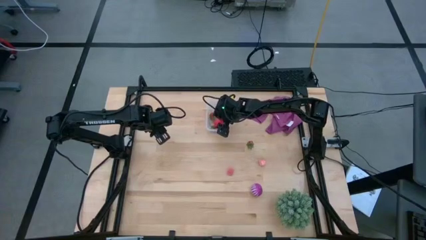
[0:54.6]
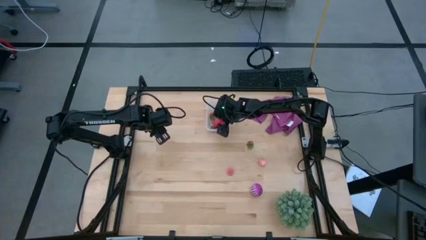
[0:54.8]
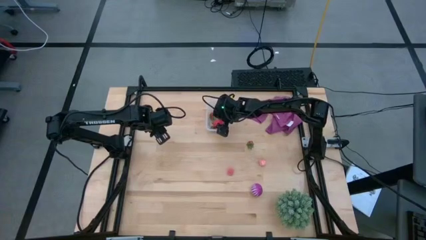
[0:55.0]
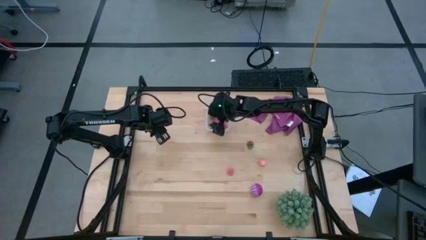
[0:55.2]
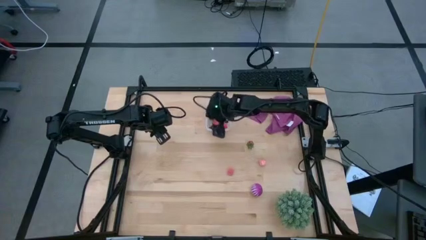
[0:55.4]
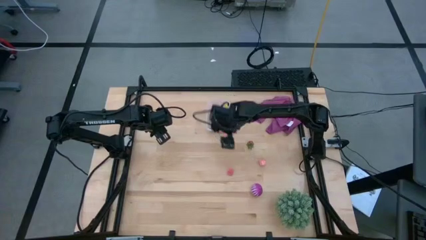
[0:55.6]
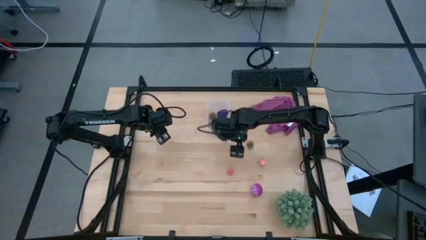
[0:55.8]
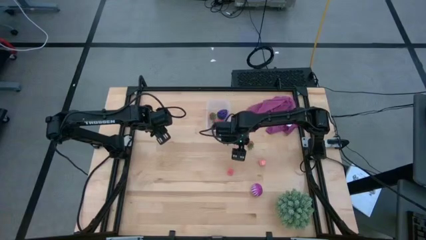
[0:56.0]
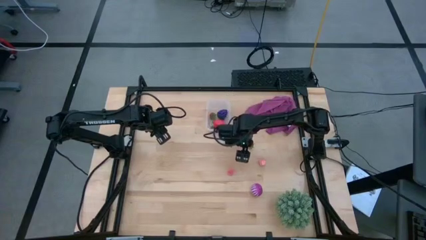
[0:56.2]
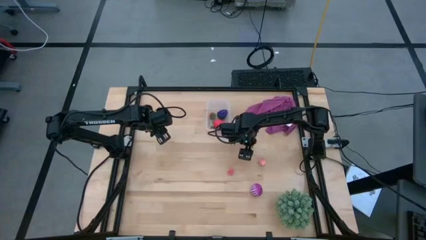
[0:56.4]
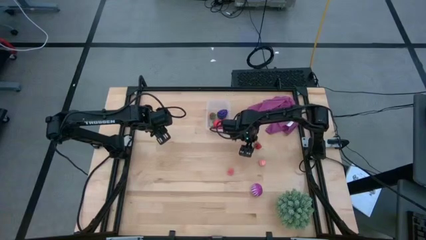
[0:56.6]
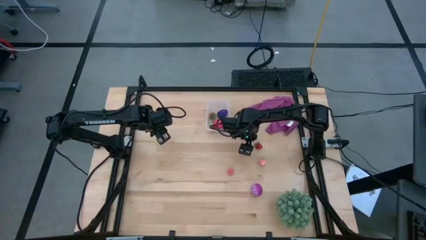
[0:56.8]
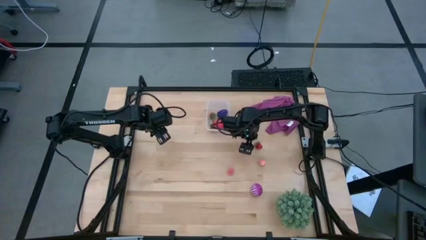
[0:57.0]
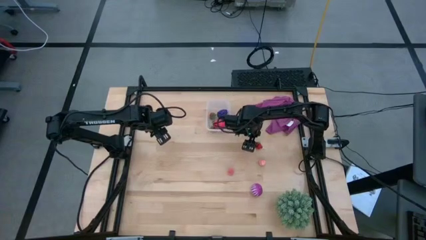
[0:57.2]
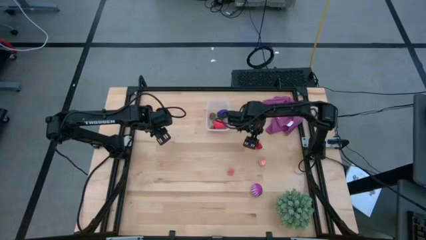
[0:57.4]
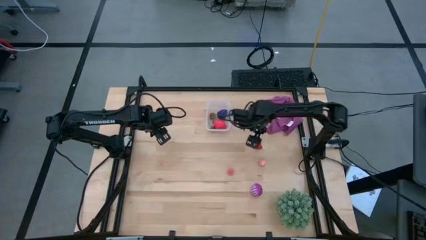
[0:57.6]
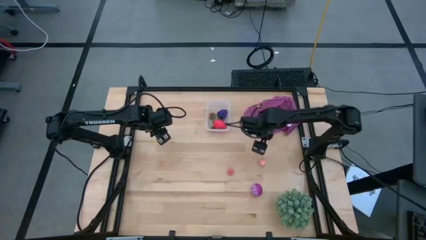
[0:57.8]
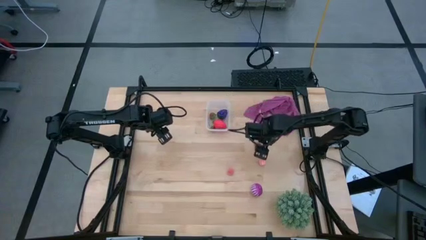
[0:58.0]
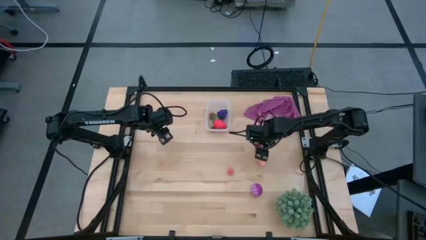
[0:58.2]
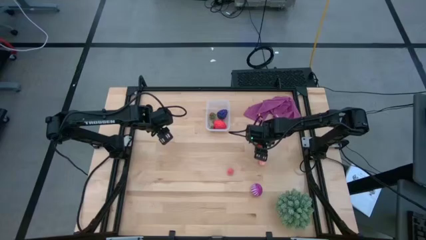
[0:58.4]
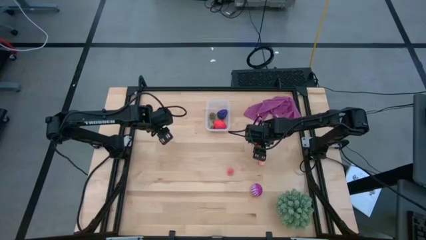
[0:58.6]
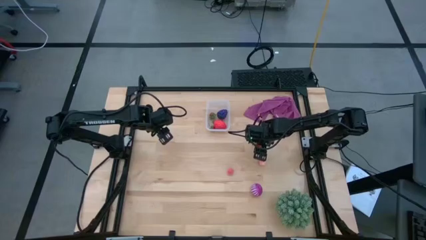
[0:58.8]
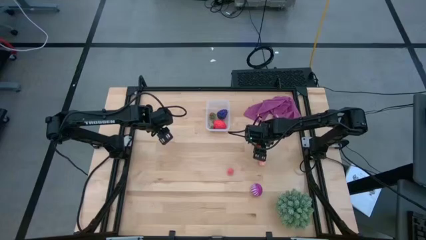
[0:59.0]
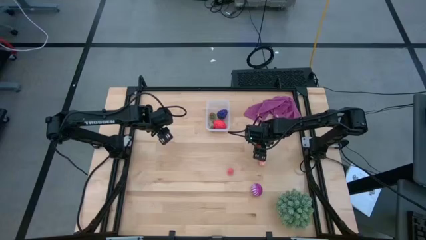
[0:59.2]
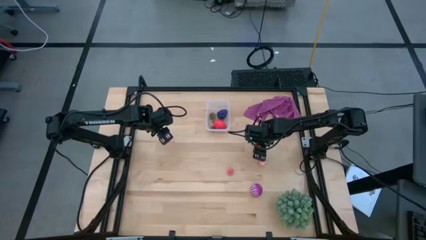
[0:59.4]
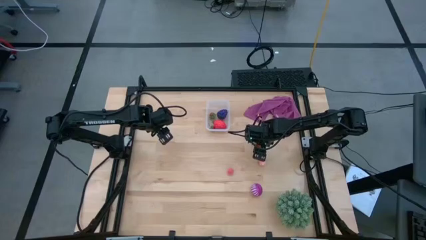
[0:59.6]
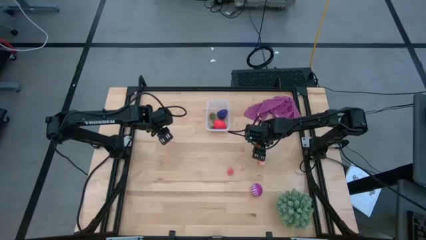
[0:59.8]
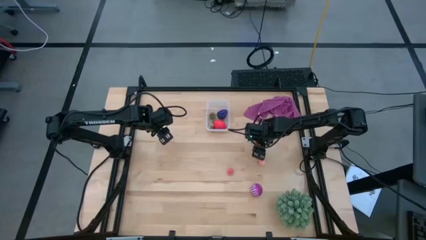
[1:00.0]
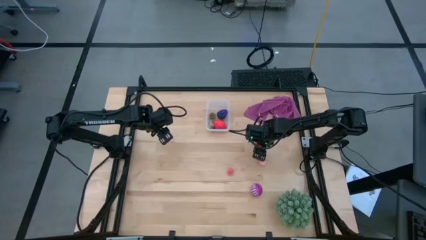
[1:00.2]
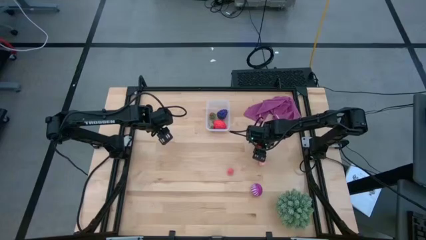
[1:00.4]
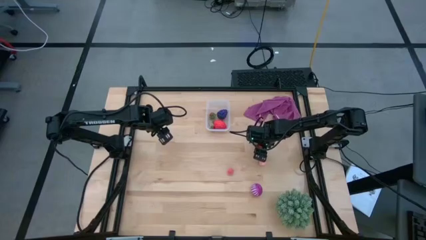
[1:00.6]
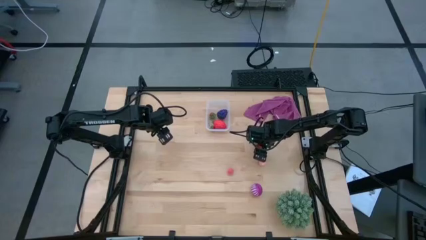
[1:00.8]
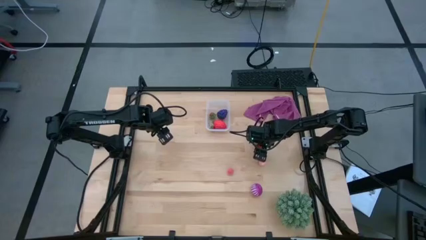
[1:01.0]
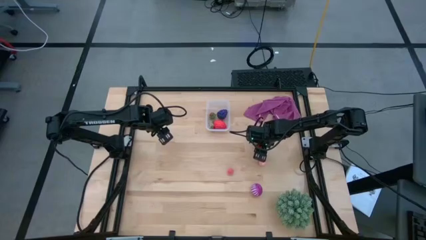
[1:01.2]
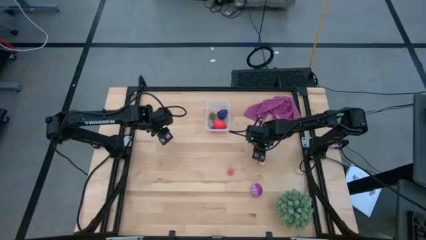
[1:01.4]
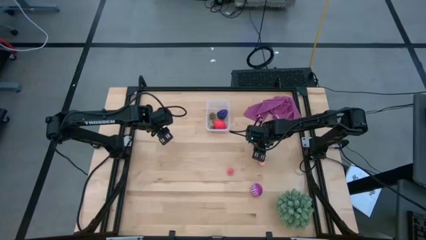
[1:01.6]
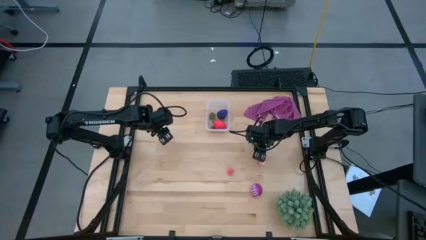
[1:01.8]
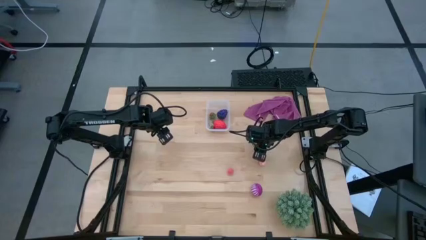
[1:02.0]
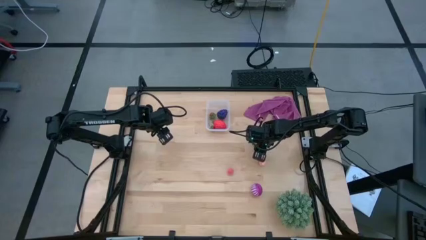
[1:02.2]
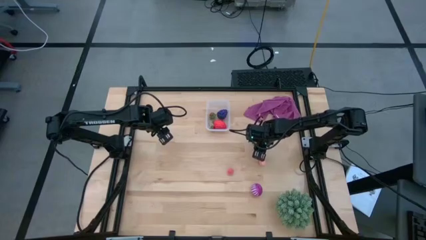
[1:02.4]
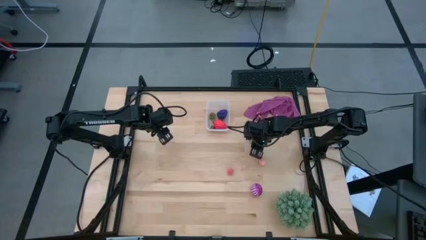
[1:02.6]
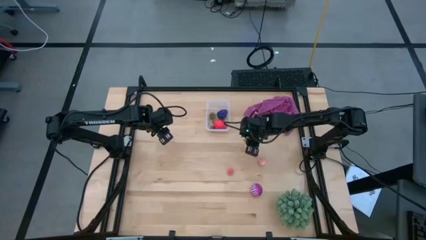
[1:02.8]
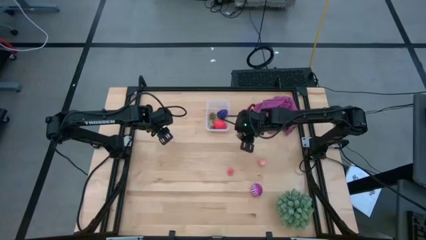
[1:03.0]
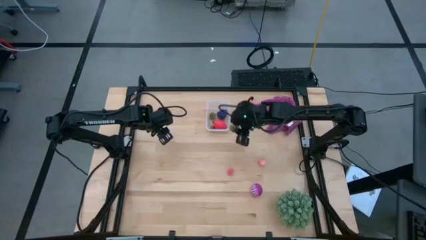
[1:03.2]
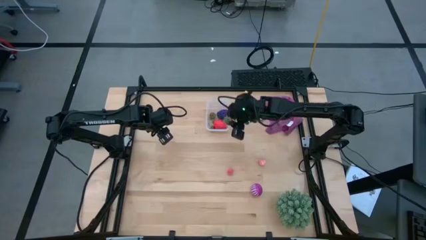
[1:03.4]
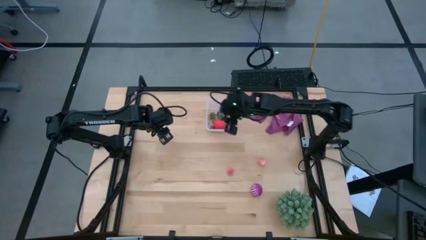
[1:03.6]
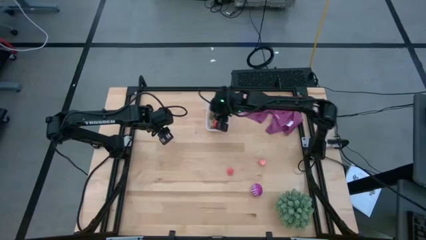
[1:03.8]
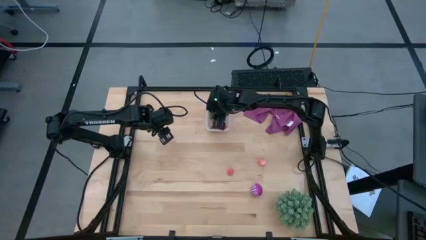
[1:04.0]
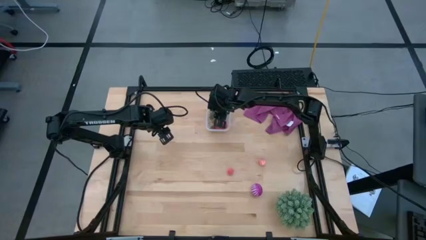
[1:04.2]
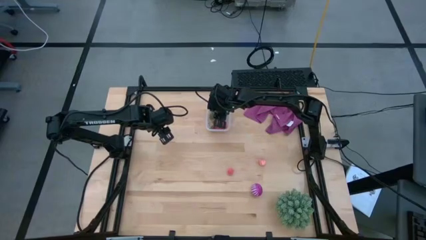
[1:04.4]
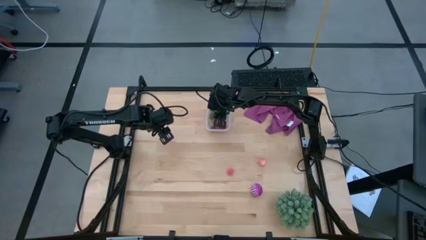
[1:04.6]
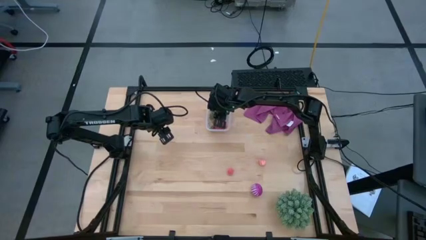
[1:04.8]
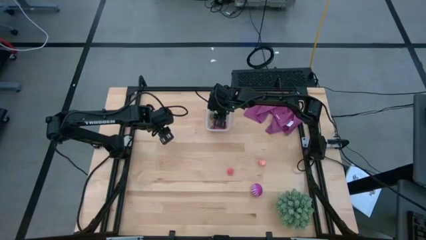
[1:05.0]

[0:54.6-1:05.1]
Task: Pick and placing Produce into tupperware
Put the strawberry into the transparent bin

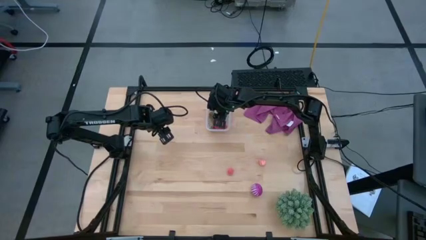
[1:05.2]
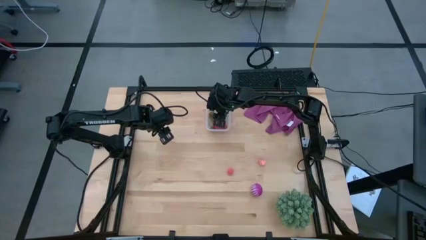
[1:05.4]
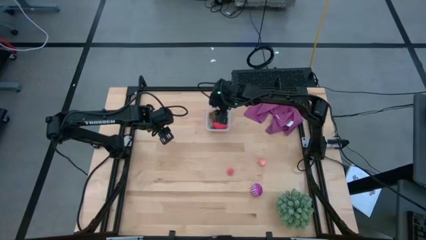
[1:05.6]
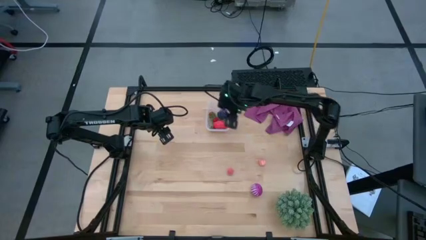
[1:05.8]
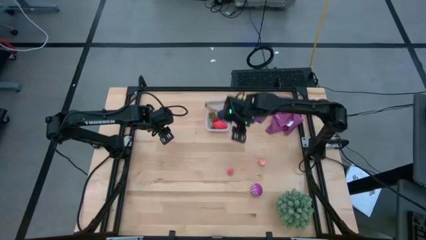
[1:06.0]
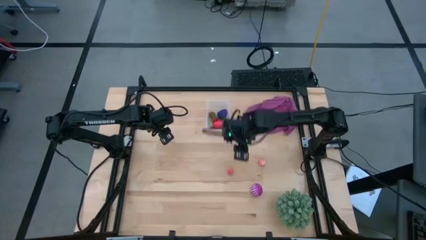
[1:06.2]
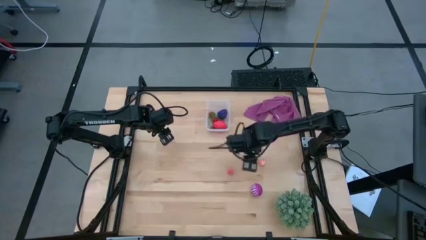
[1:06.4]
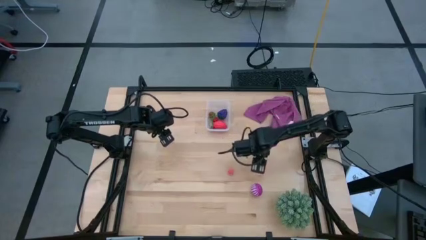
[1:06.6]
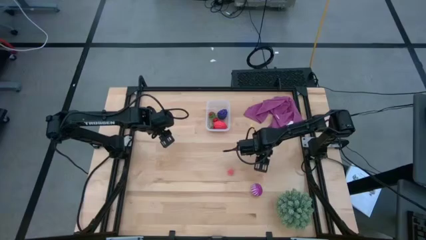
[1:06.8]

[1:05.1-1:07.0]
Put the top pink peach into the transparent bin

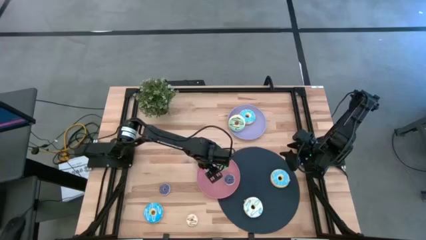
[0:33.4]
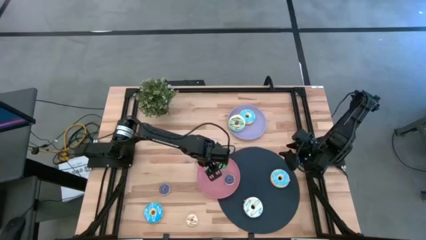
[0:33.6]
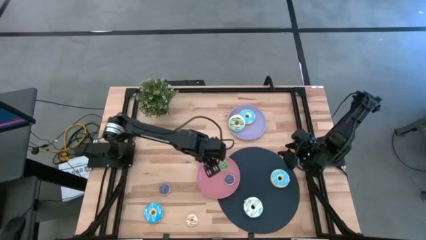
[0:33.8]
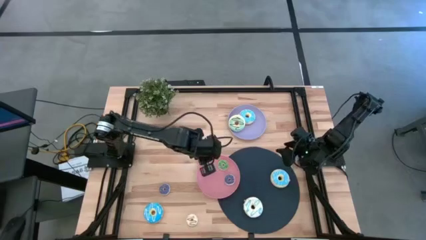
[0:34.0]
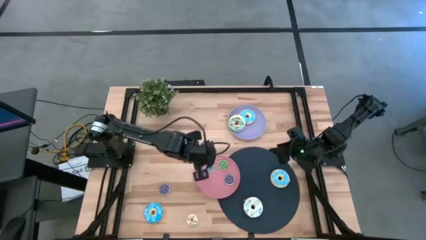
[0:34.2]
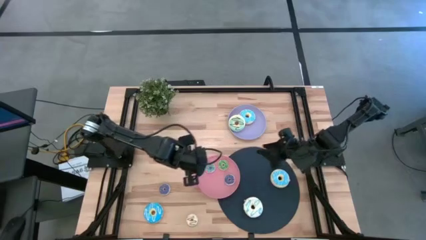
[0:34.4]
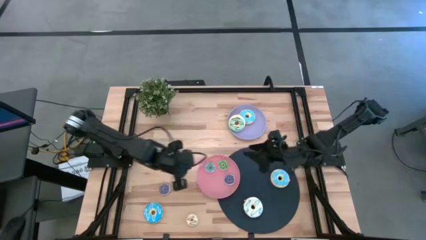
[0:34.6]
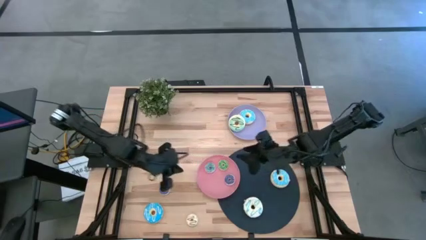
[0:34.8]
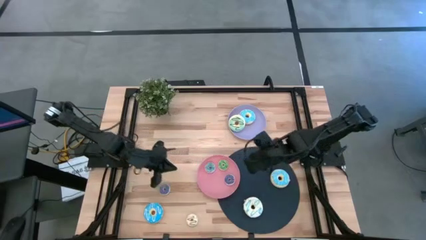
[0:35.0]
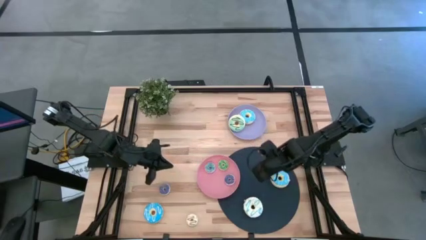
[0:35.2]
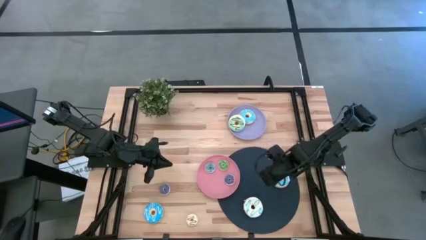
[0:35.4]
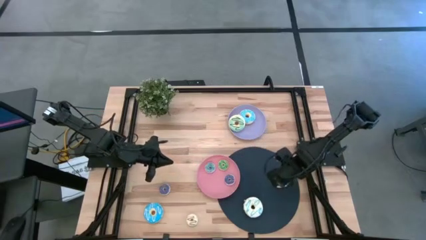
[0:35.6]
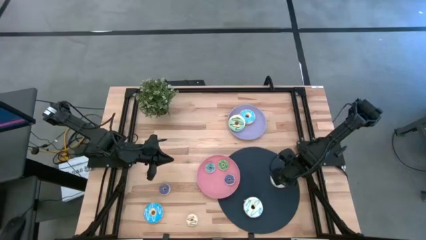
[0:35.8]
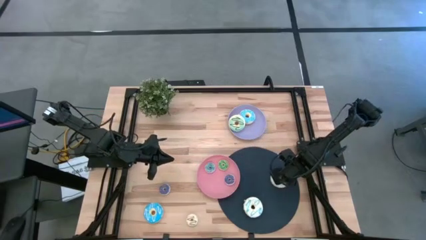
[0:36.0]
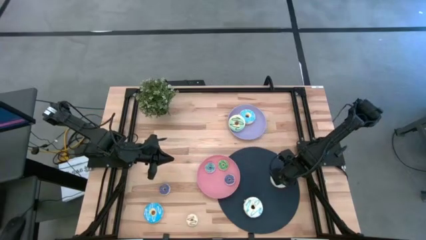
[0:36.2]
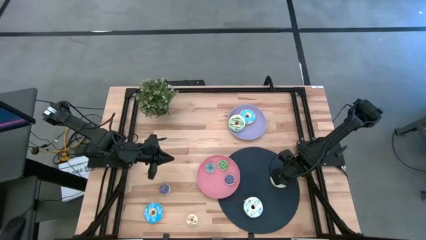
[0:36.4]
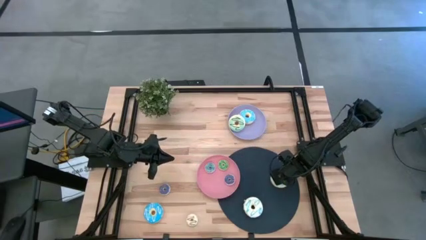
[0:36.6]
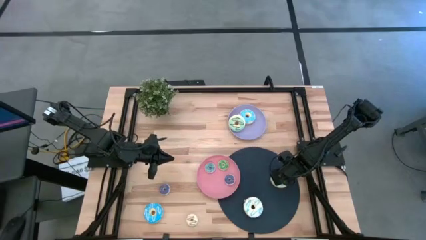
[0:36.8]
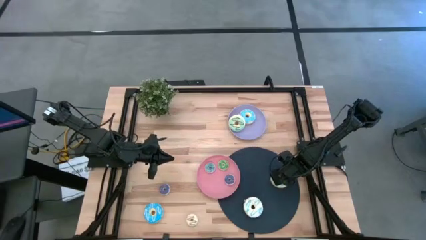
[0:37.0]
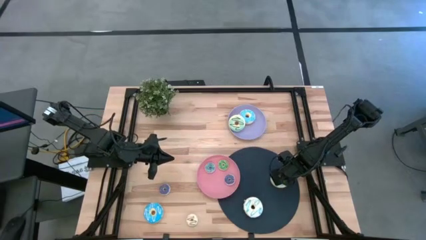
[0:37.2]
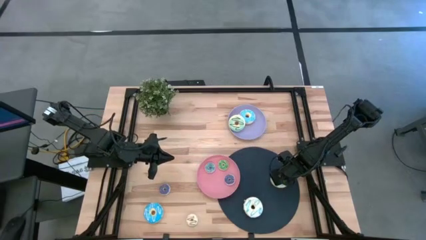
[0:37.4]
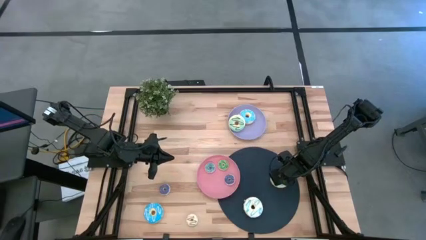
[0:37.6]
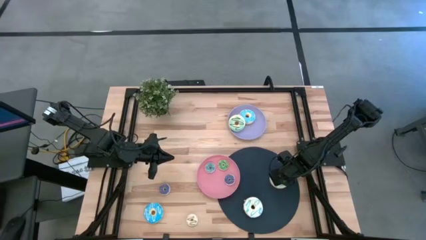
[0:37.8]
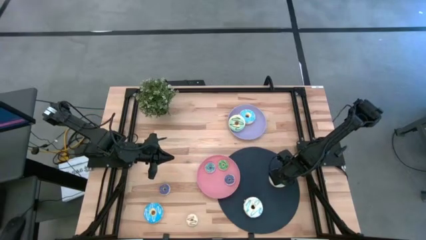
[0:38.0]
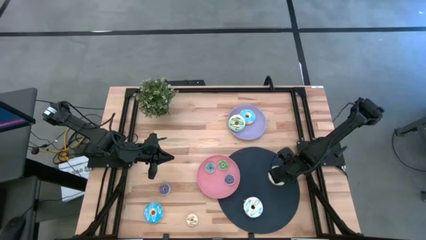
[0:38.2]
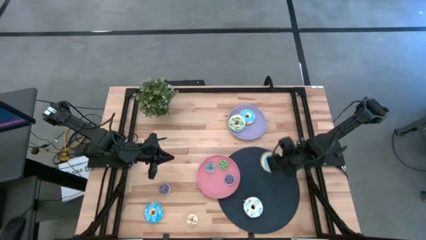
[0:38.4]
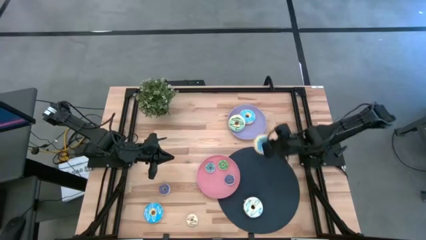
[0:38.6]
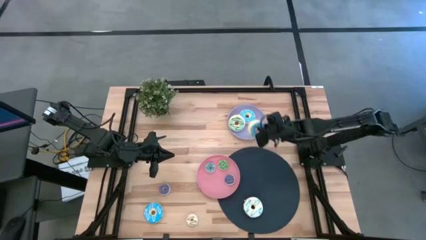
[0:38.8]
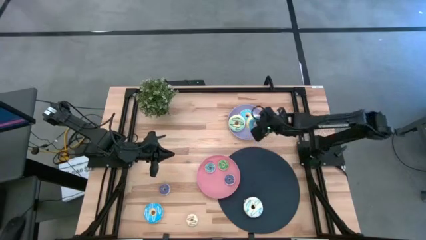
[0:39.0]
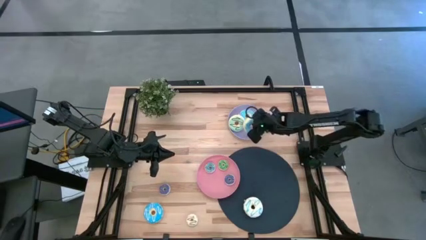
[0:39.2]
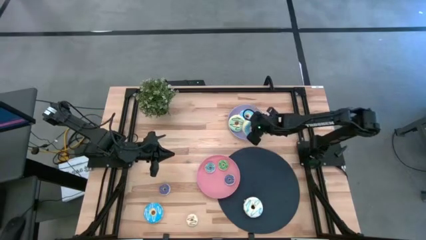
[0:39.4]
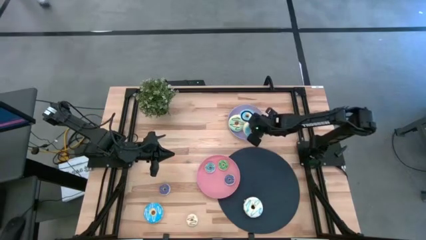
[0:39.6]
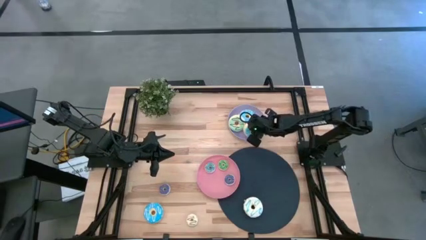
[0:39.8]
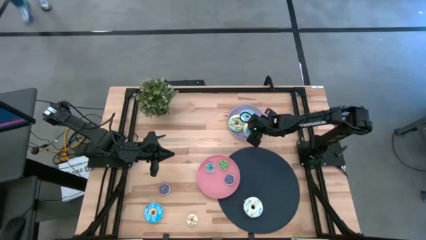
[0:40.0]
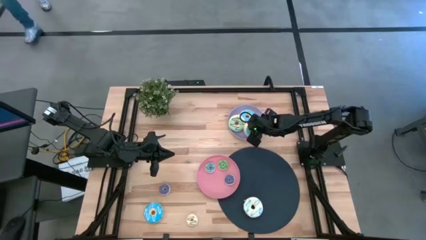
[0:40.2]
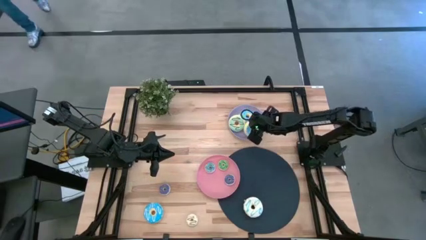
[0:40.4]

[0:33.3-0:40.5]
Task: Pick & Place donuts
Put the right big blue donut on the purple plate
